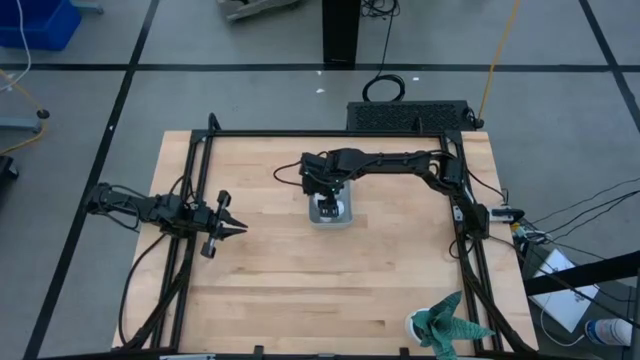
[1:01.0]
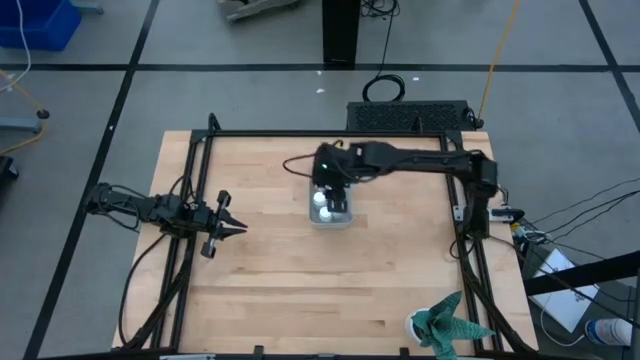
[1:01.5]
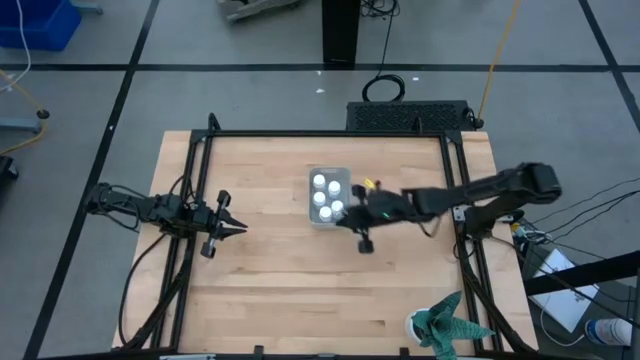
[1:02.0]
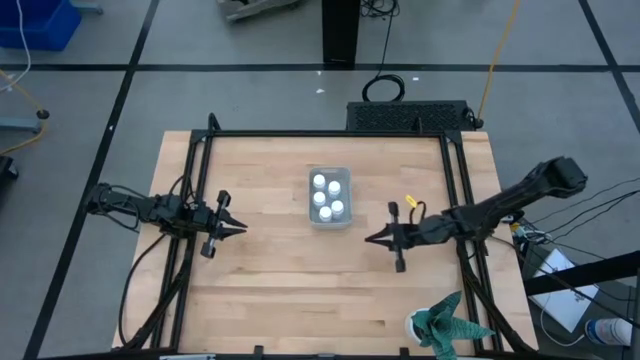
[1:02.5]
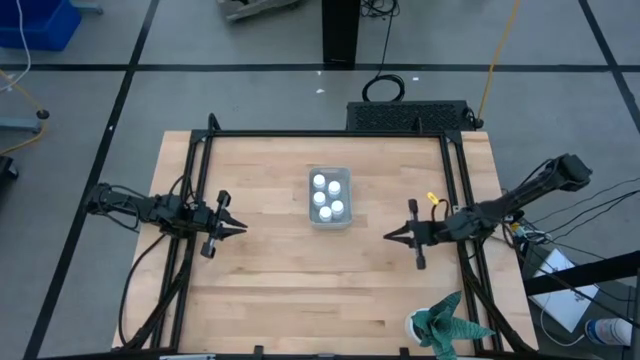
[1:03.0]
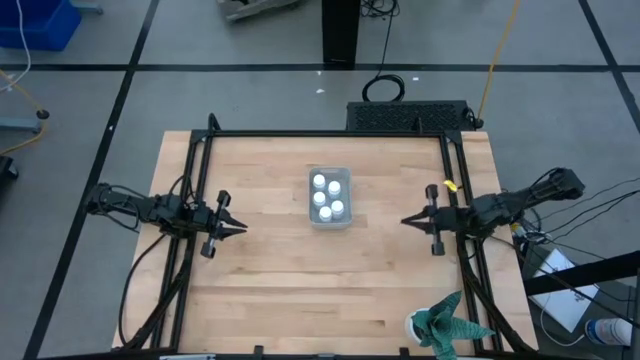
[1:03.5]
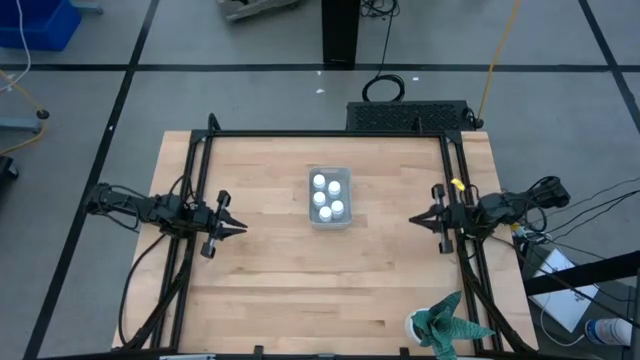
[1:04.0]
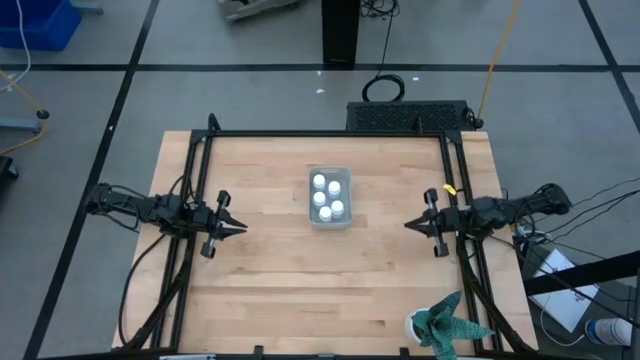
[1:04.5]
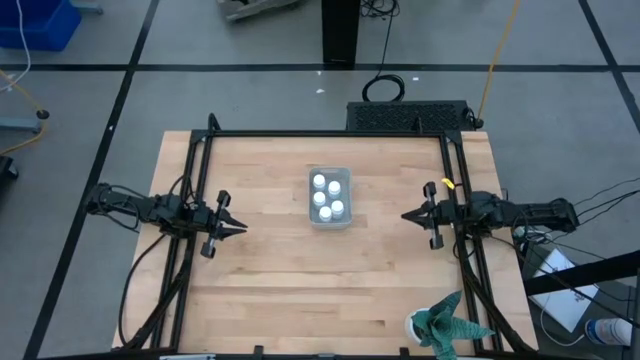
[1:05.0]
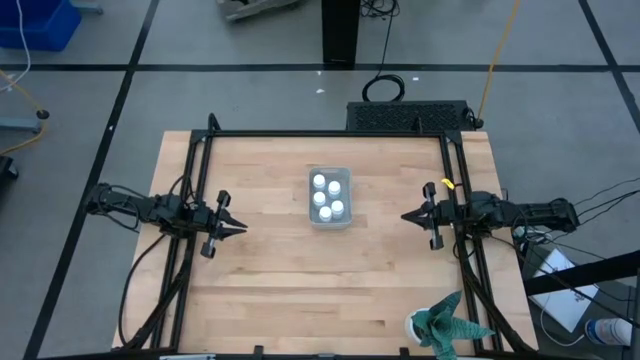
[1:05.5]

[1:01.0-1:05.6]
Task: Pick and place pill bottles into a basket
Return to Home Position

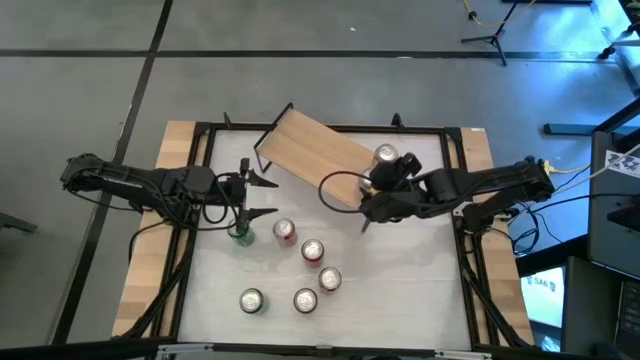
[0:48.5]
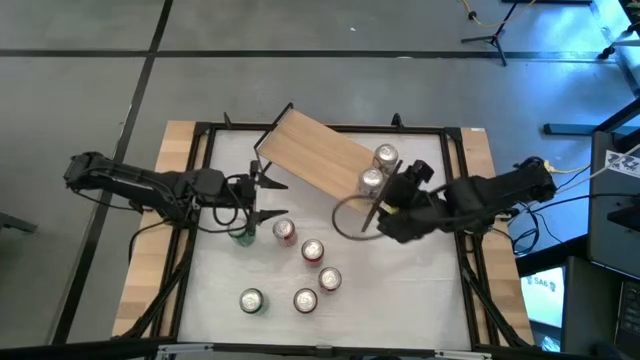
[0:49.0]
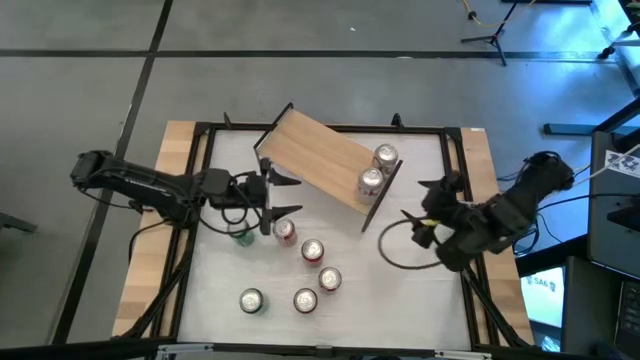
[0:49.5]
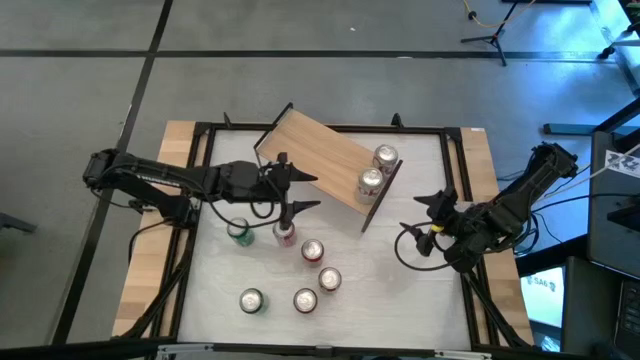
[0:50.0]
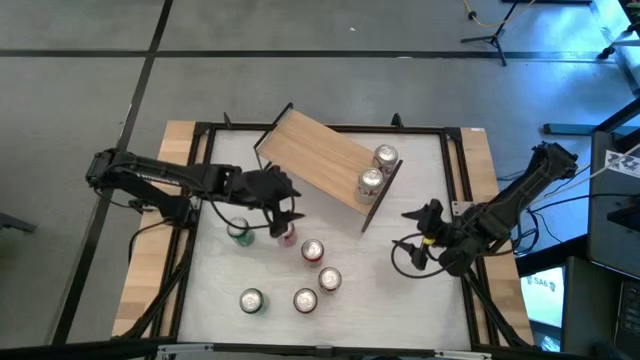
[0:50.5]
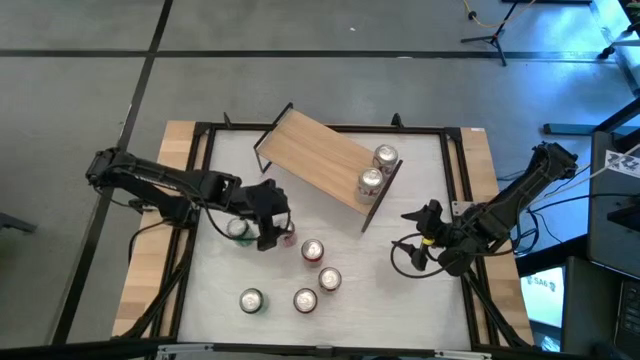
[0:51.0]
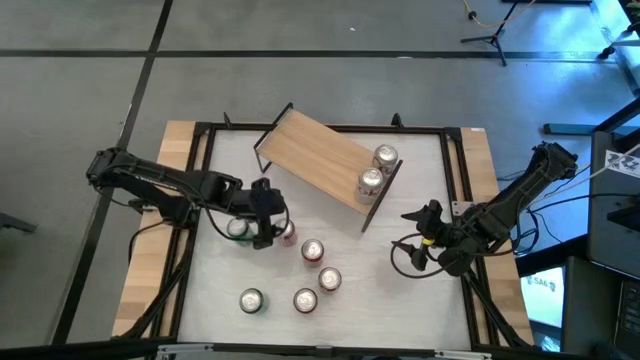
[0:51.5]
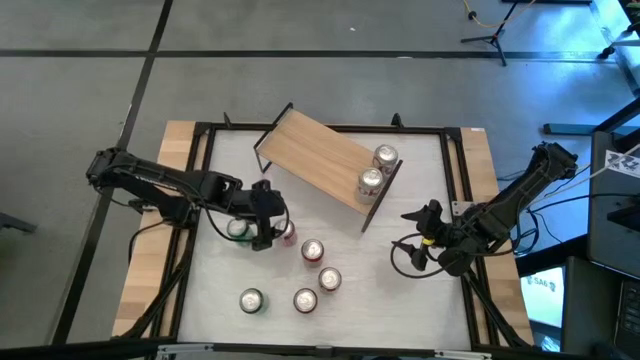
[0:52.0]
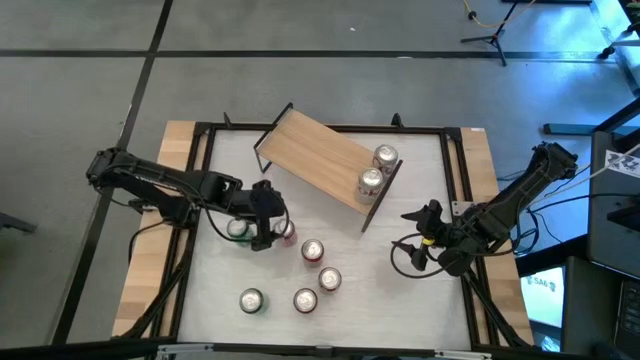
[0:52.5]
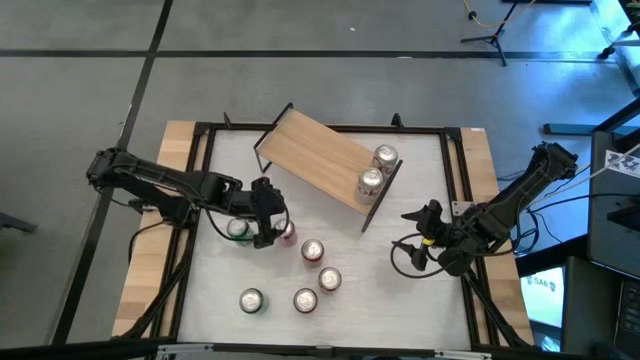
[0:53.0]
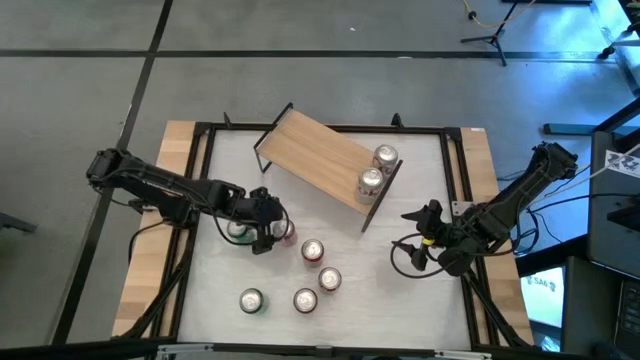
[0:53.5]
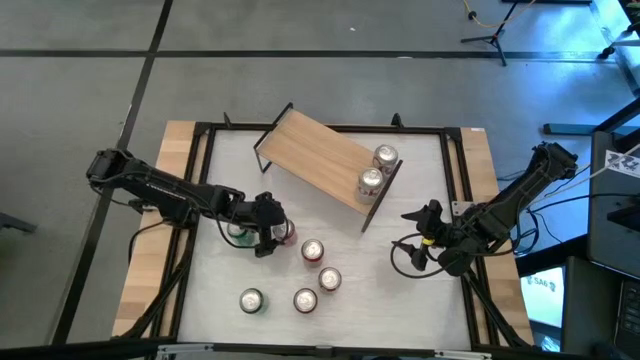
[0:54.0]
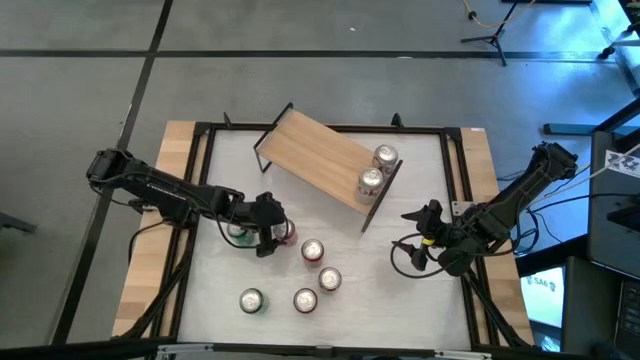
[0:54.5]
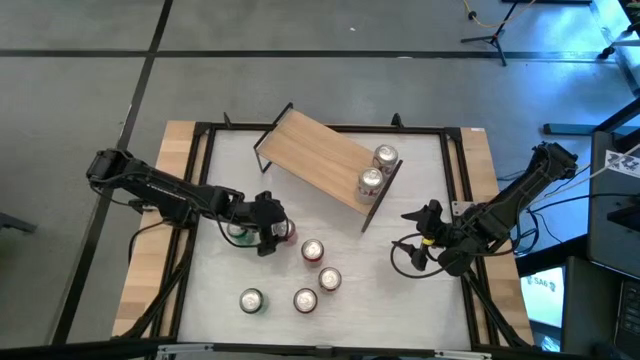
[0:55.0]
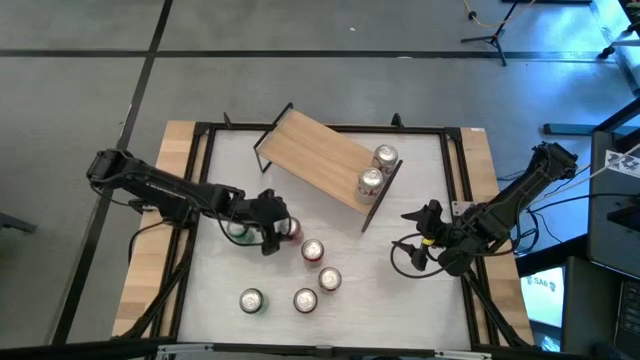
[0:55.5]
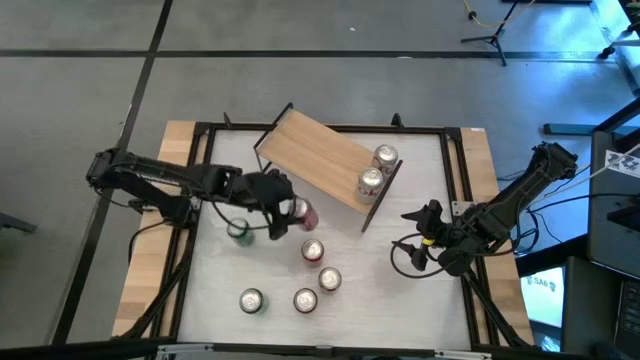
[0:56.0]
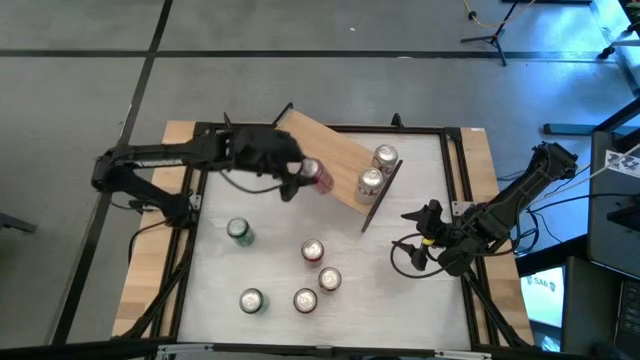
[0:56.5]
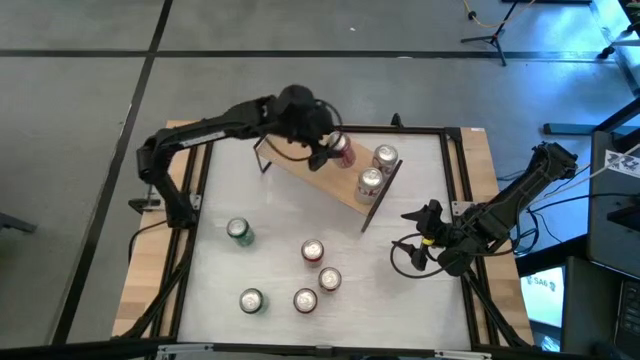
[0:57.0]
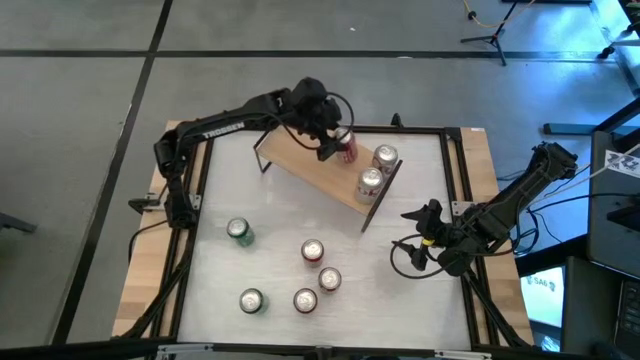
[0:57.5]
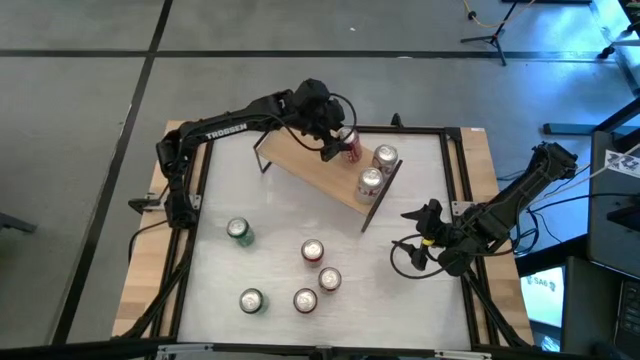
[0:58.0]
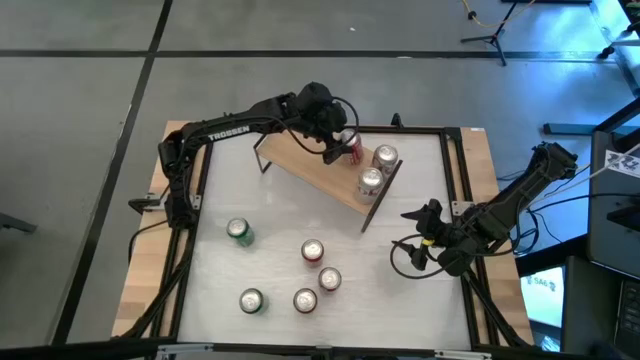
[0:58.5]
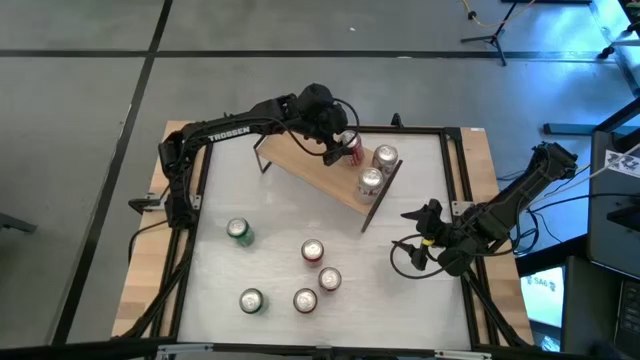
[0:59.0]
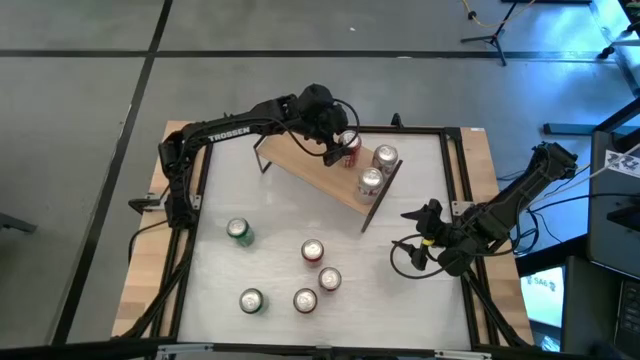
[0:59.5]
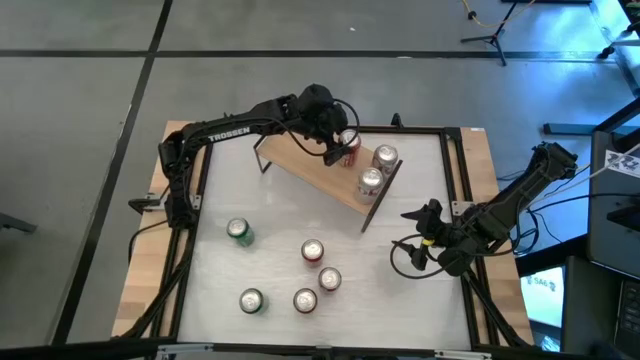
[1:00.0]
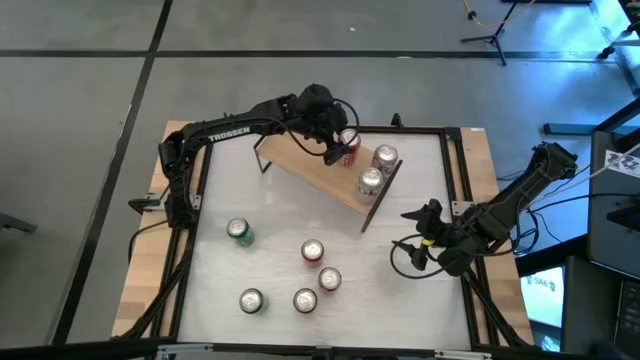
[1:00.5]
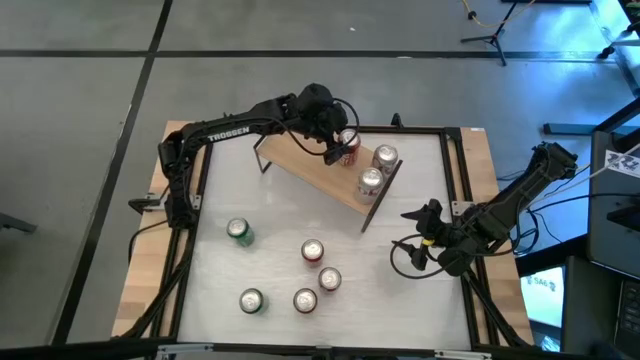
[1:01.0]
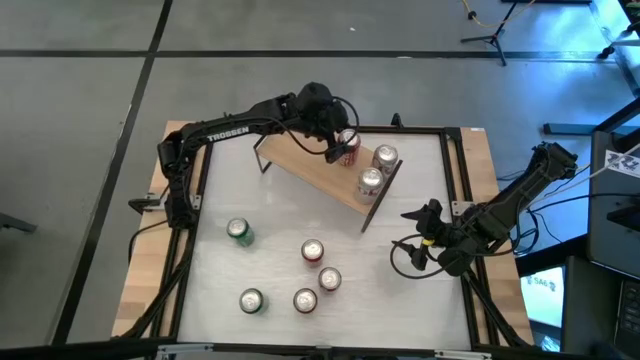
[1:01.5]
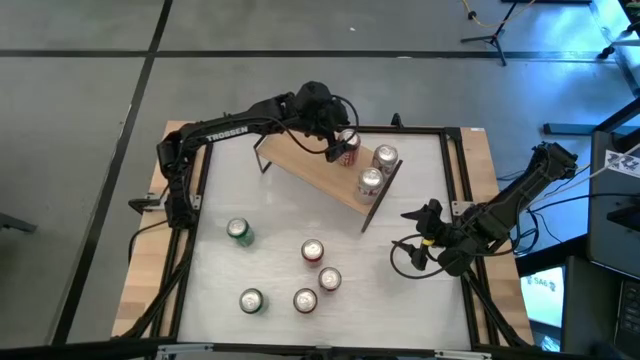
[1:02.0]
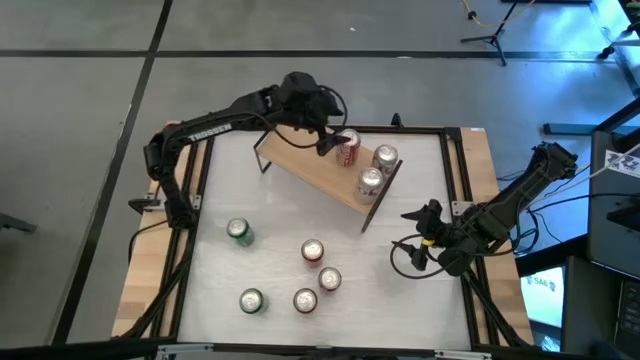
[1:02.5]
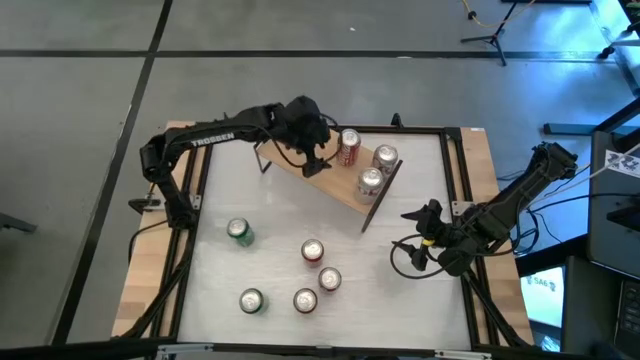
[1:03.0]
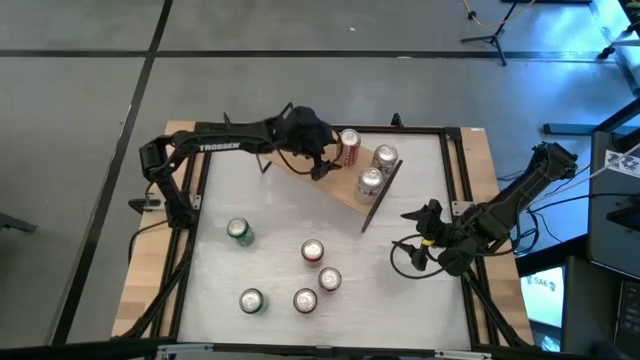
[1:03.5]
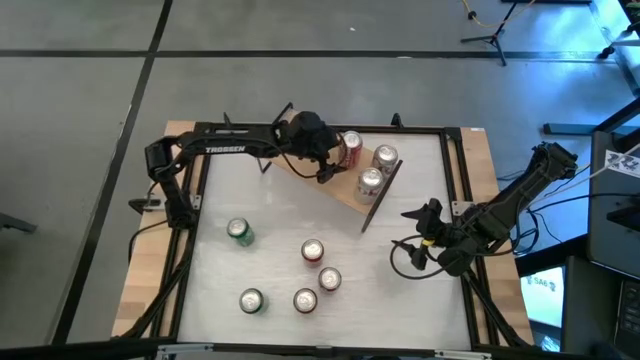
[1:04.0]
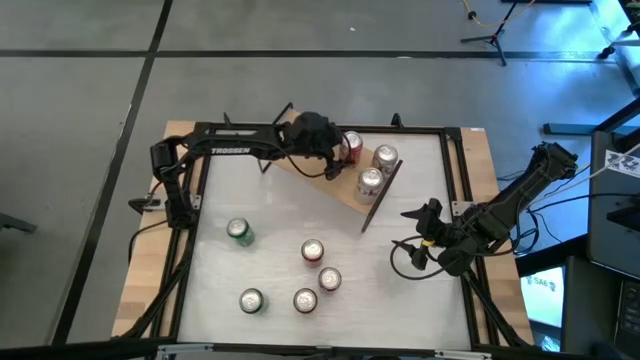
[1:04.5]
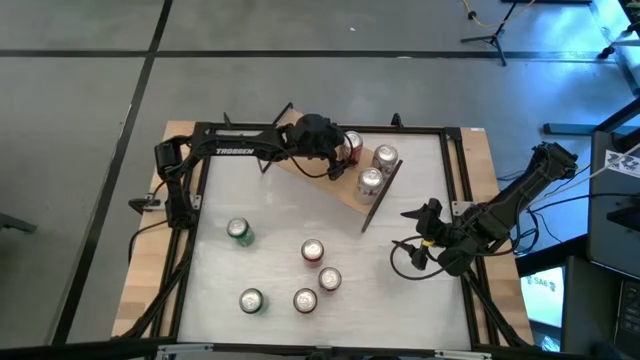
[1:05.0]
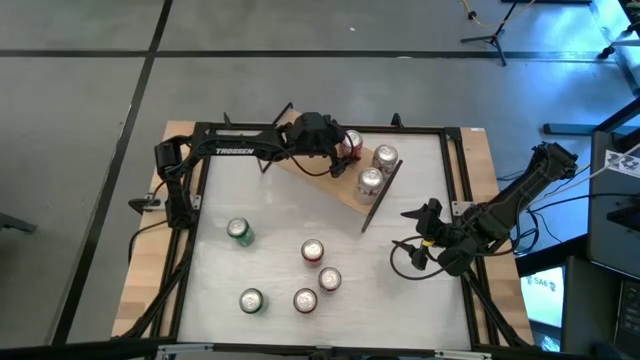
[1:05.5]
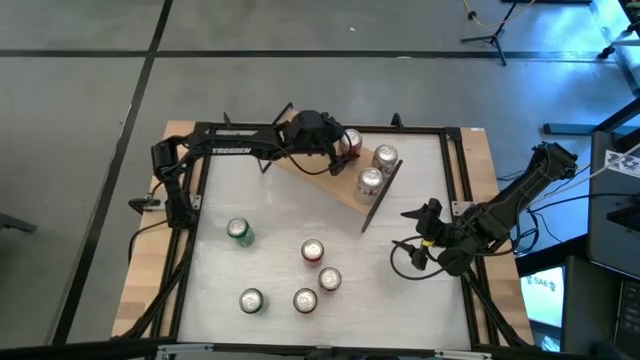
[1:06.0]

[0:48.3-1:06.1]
Task: Place canned beverage on shelf
Put the top red-white soda can on the shelf
